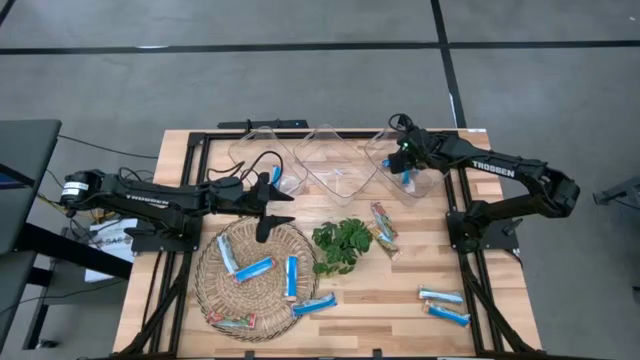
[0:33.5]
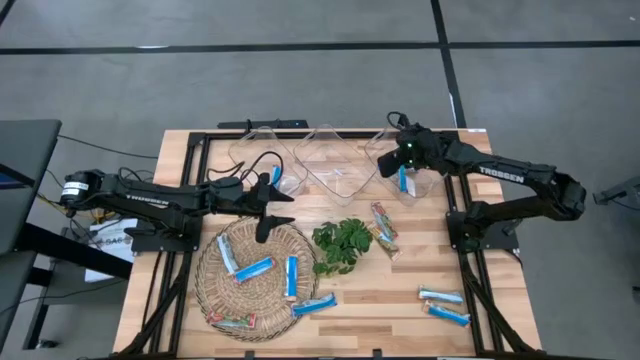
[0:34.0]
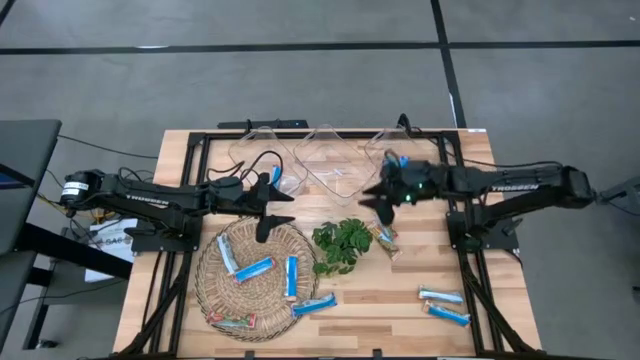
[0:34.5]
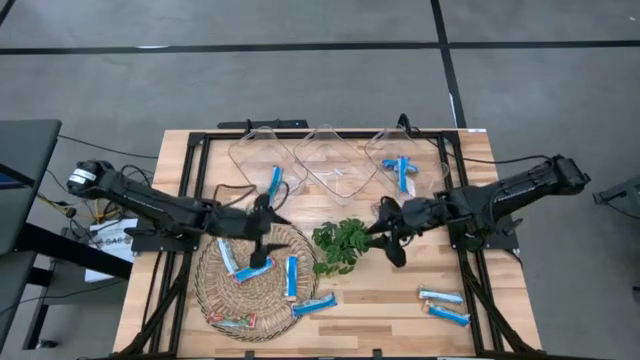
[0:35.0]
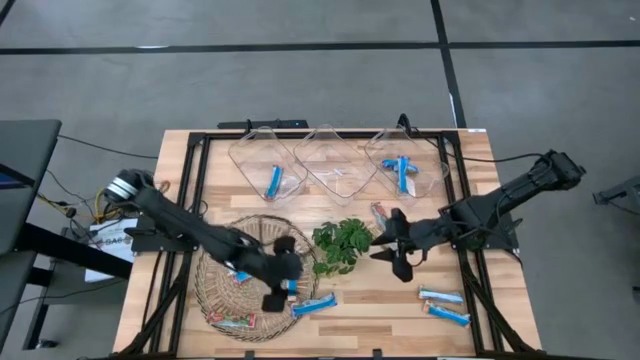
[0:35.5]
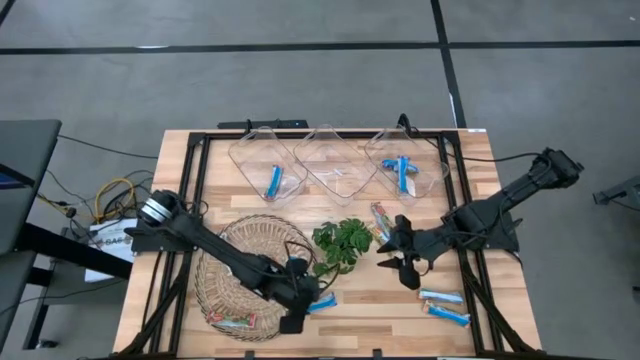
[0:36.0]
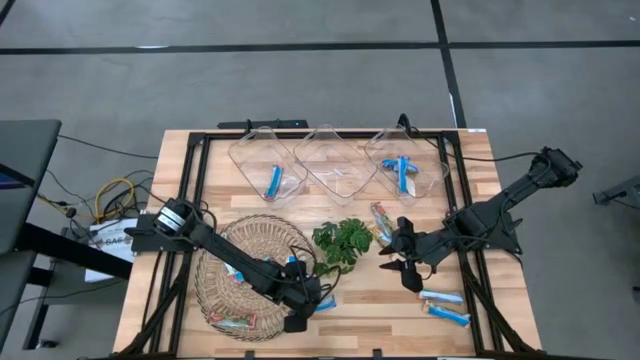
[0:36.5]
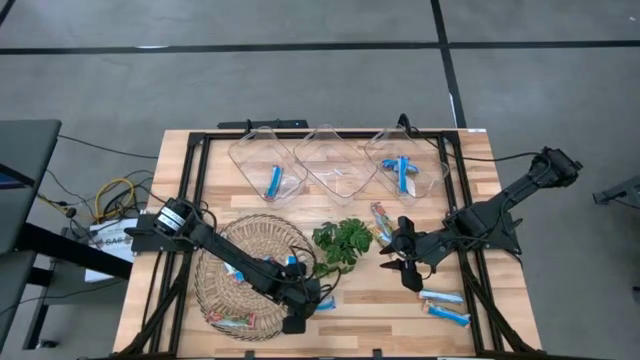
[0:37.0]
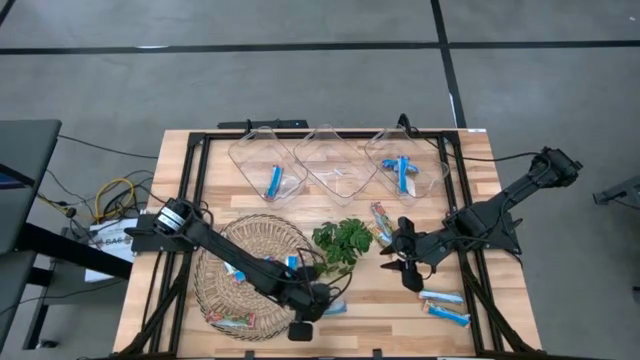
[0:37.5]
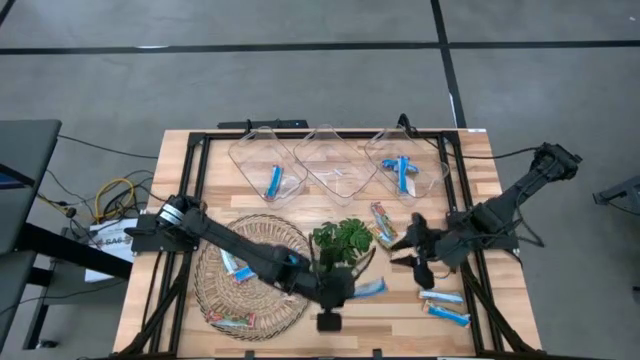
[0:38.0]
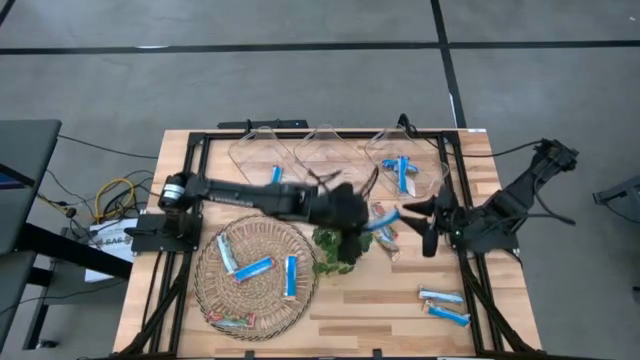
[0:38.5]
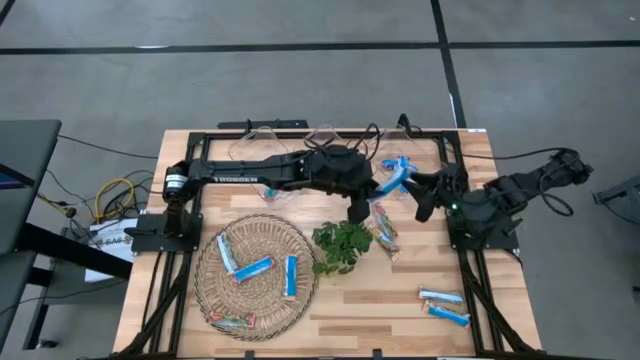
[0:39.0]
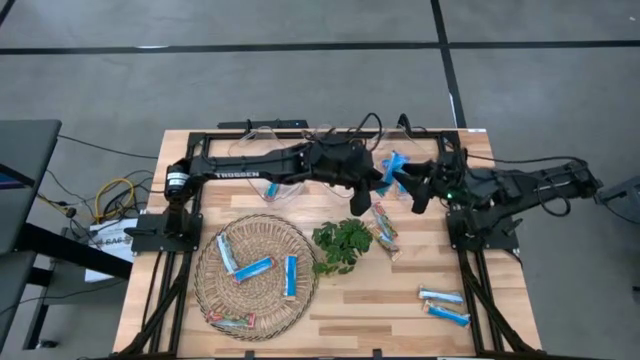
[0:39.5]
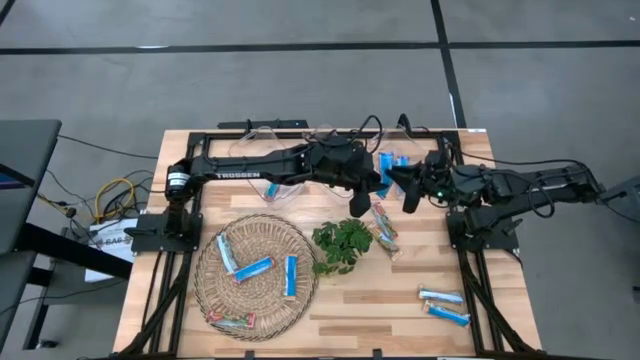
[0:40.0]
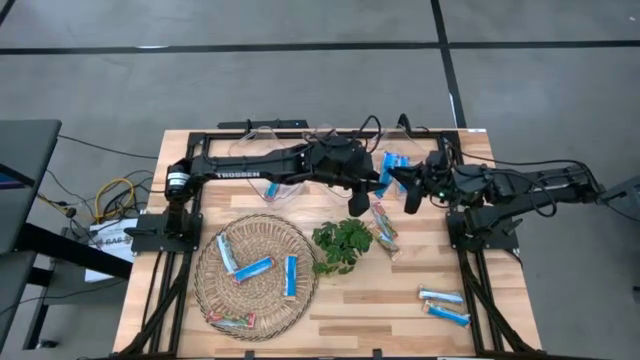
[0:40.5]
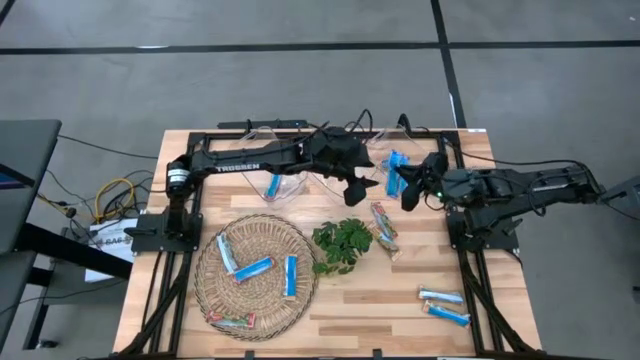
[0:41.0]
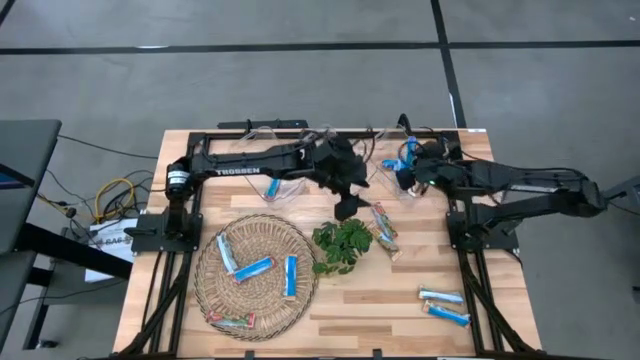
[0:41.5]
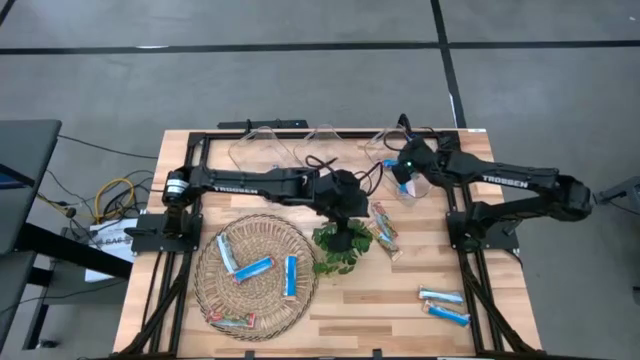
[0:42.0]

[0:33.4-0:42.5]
Task: Pick and place Granola Bars by type
Put the blue granola bar into the right transparent bin

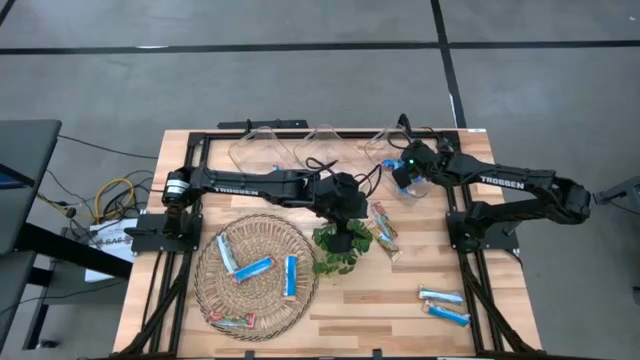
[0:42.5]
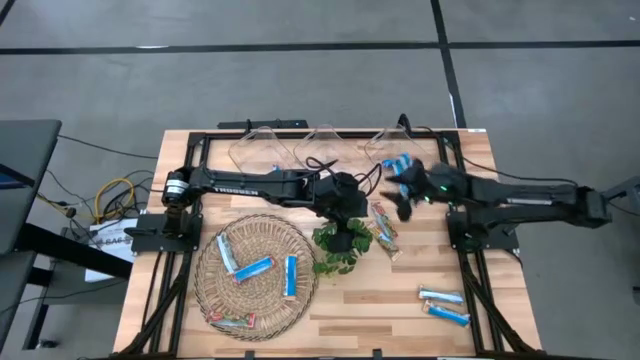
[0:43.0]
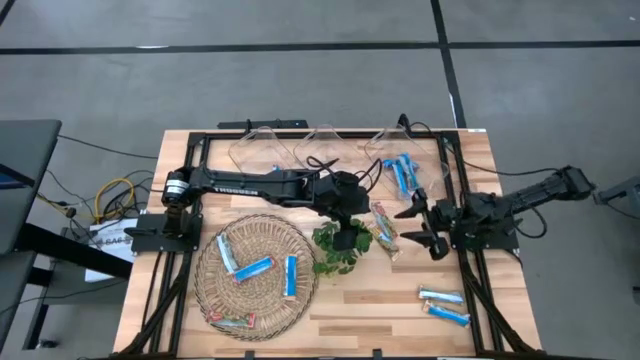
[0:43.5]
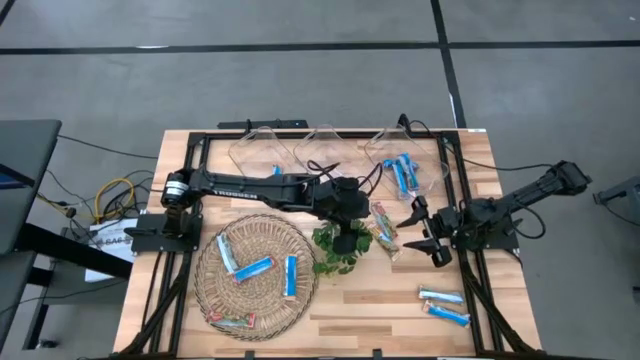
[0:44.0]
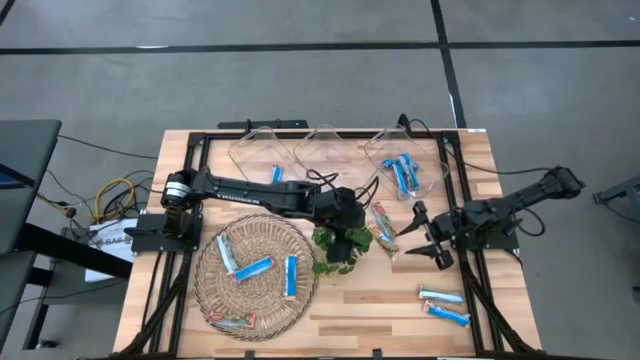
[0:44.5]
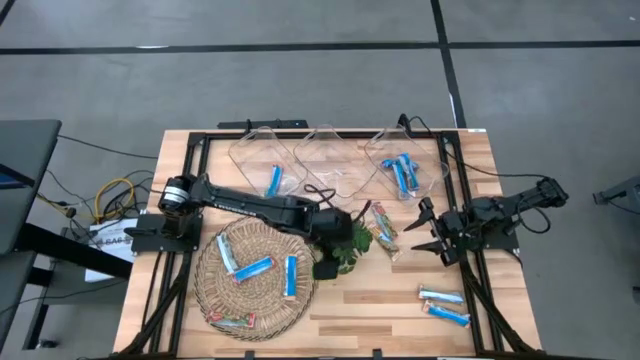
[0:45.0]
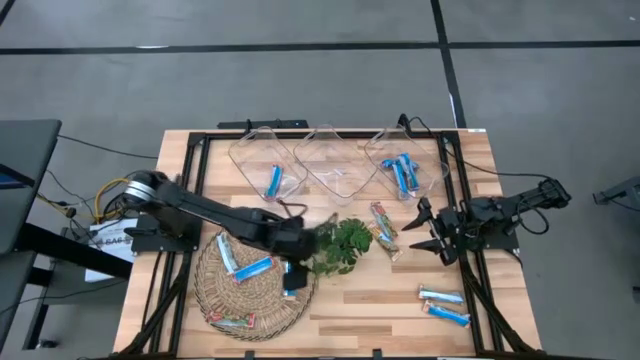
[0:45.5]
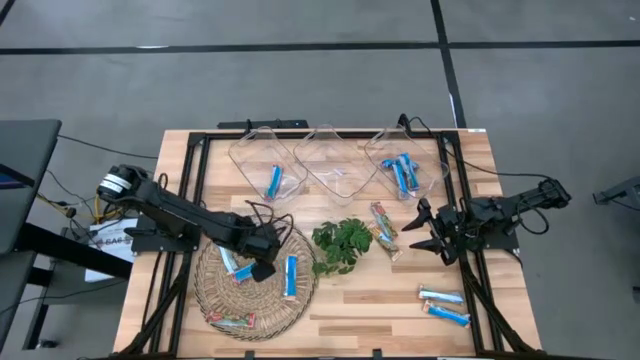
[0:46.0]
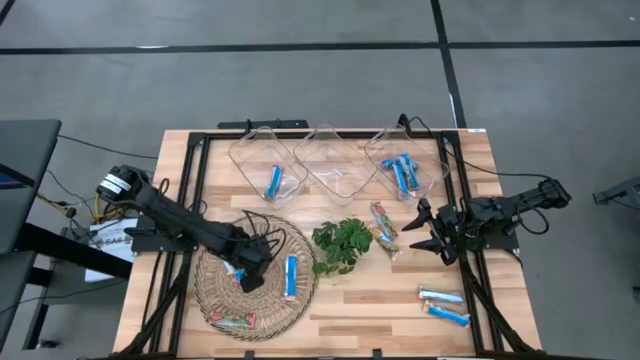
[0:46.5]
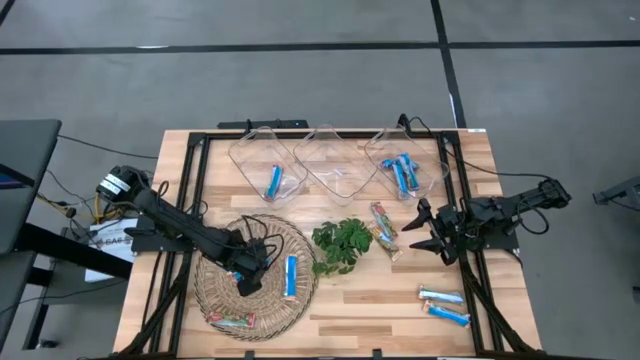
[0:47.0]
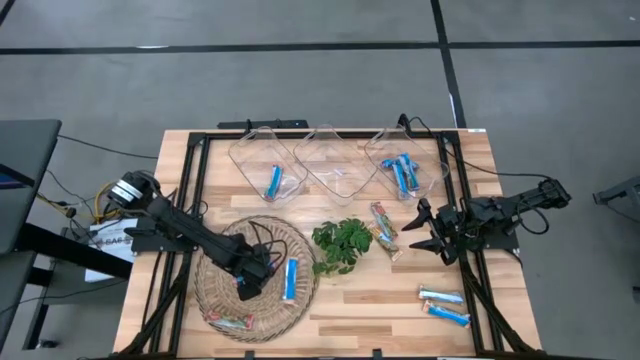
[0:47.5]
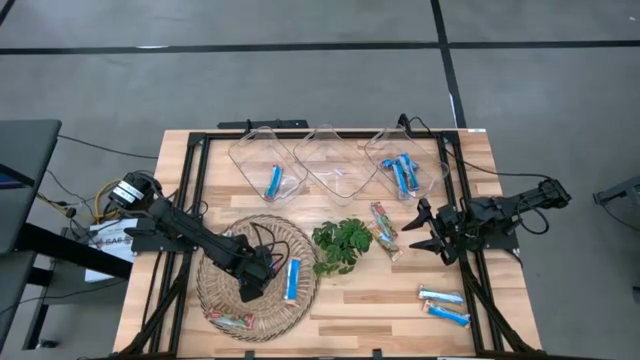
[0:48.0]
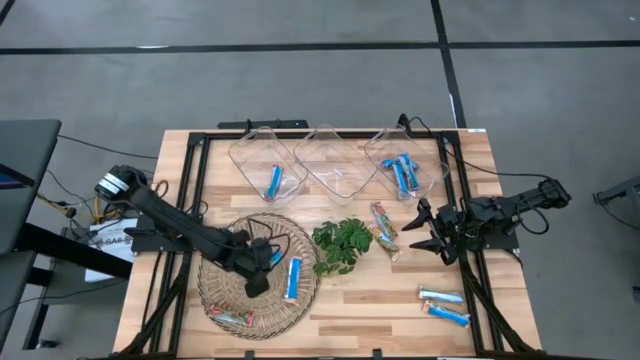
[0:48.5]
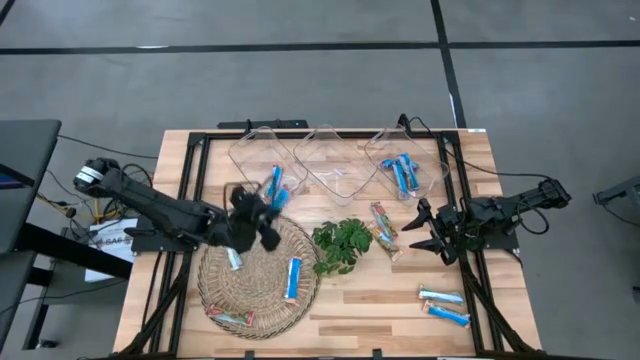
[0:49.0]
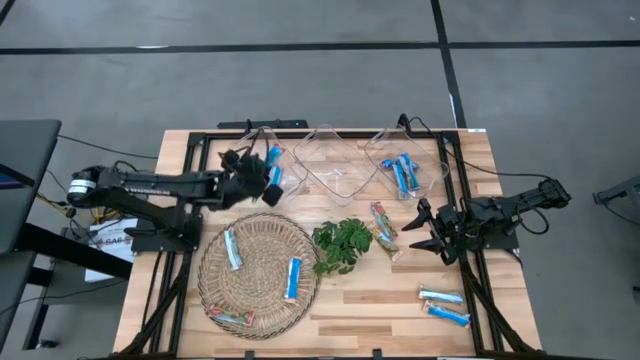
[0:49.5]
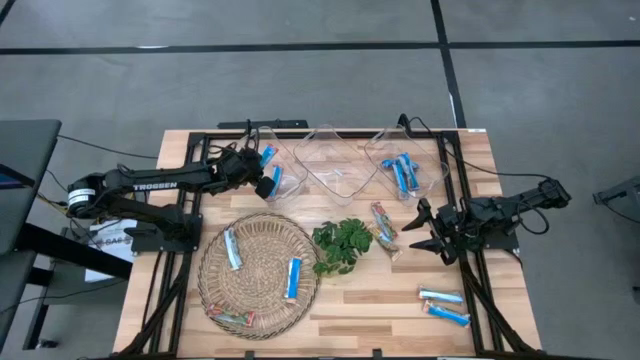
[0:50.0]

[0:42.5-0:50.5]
Put the red granola bar into the left transparent bin

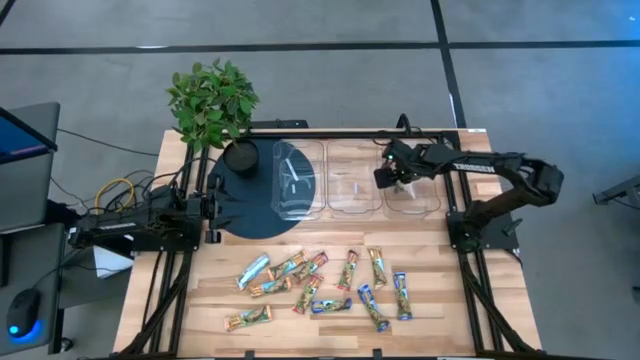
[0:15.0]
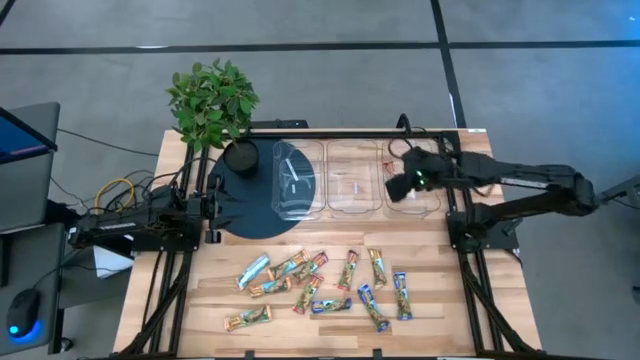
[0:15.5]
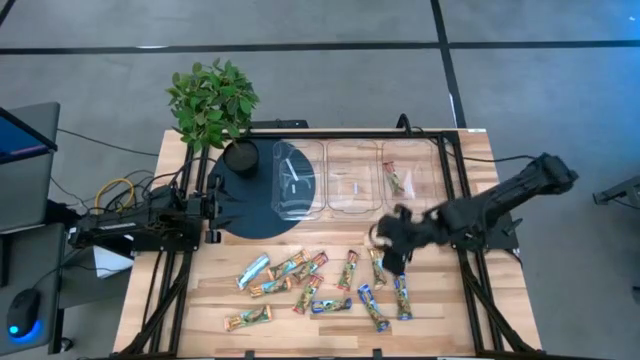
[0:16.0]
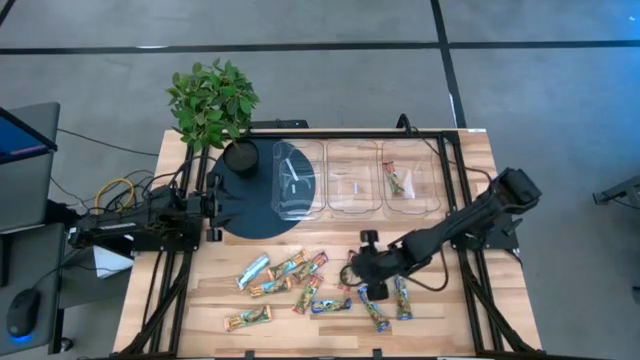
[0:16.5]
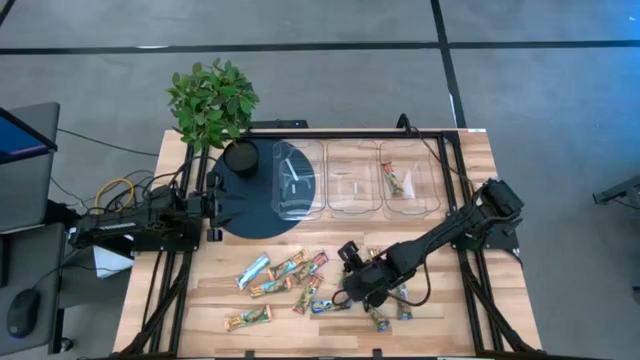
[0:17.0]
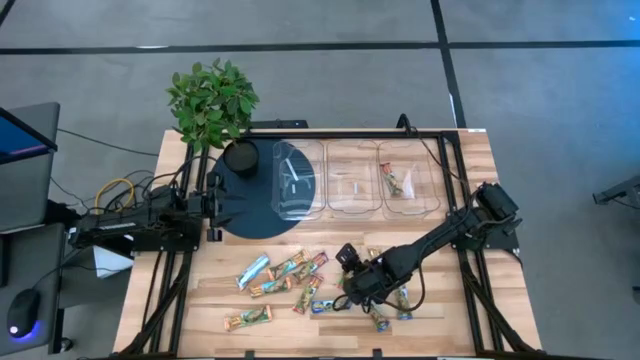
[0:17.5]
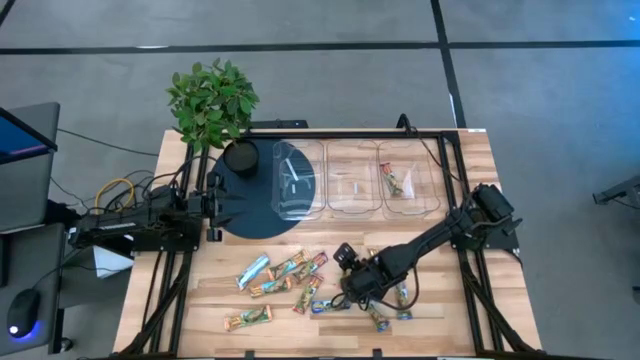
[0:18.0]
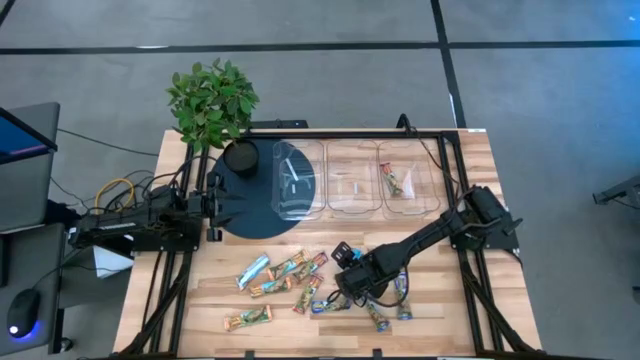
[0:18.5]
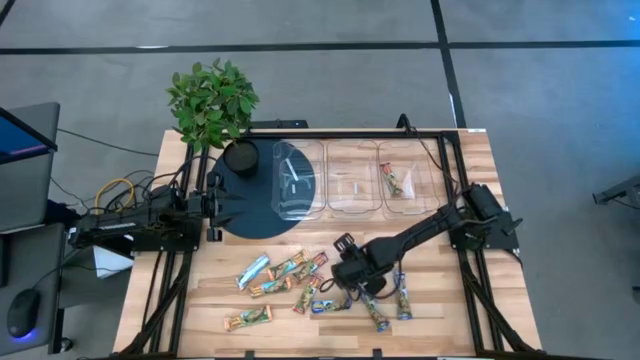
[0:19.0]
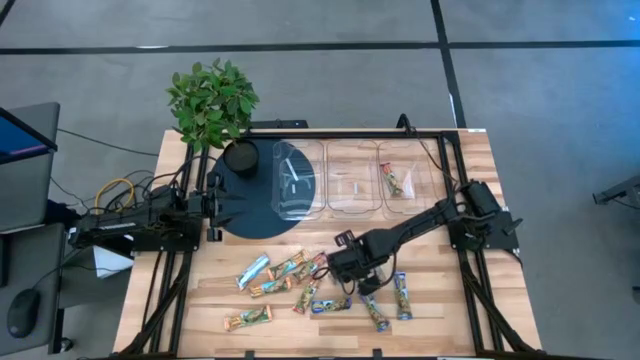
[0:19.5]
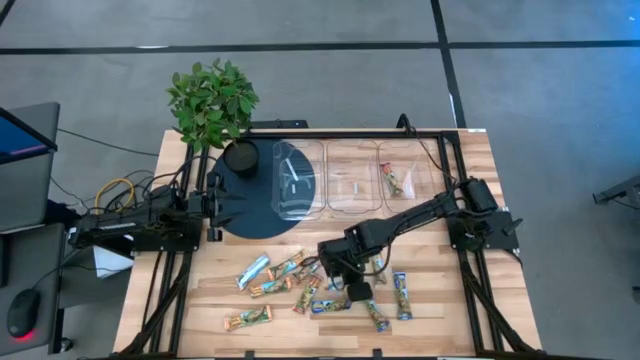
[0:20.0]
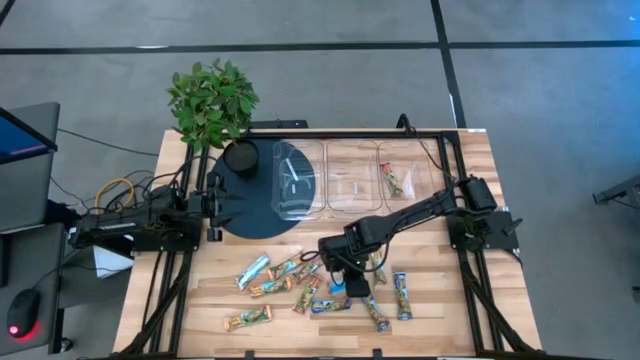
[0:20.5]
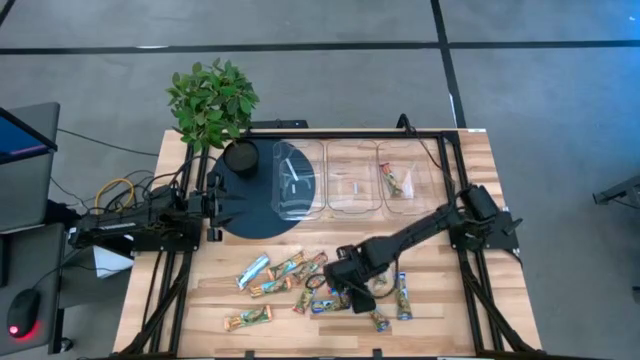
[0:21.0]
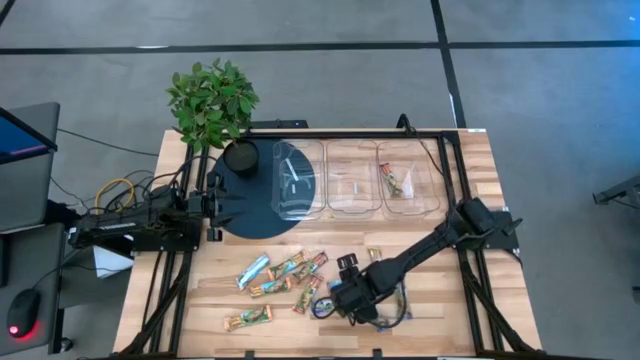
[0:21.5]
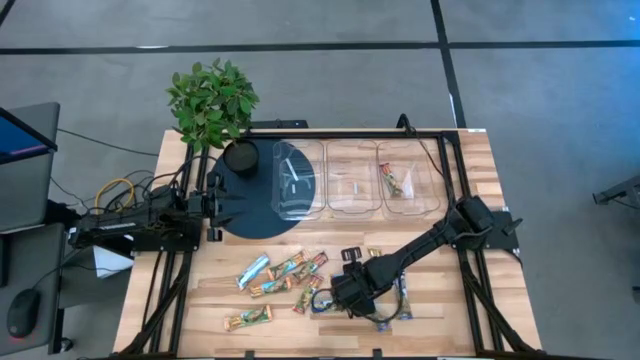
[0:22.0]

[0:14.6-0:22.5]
Task: Pick and place Granola Bars by type
Put the red granola bar into the right transparent bin
